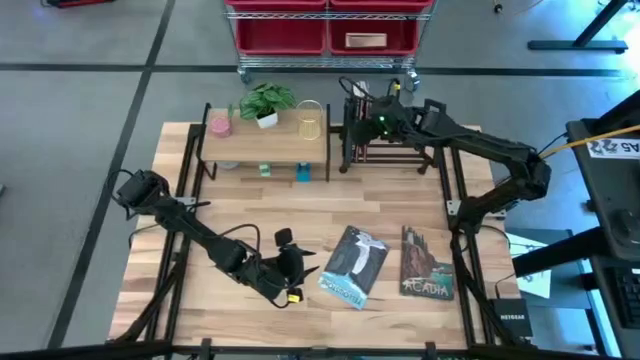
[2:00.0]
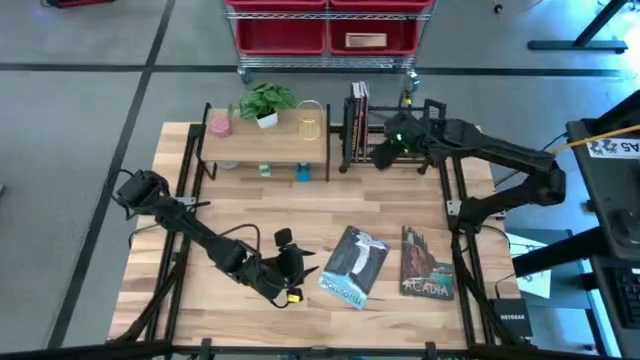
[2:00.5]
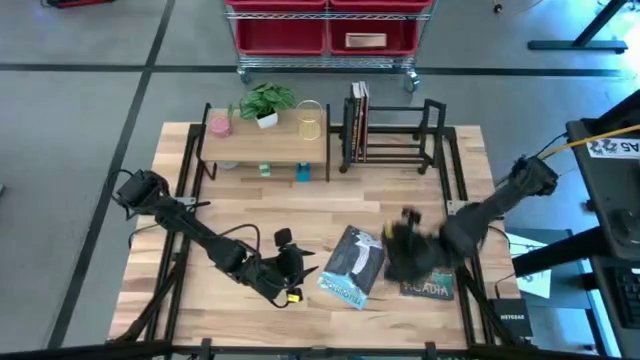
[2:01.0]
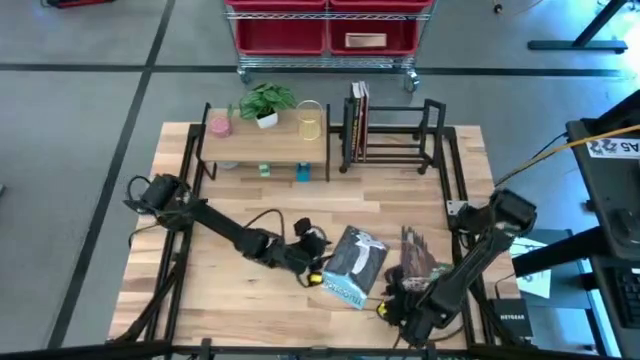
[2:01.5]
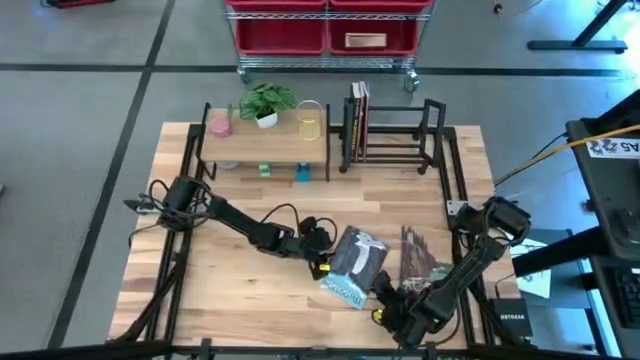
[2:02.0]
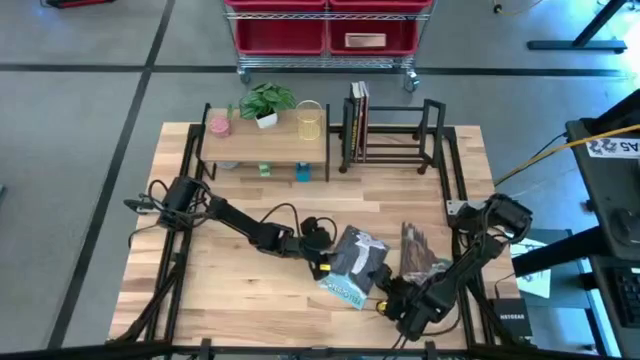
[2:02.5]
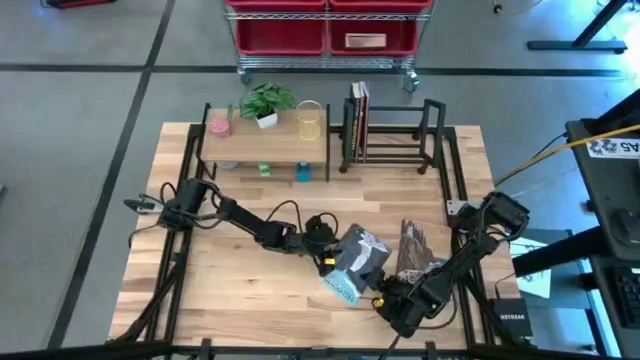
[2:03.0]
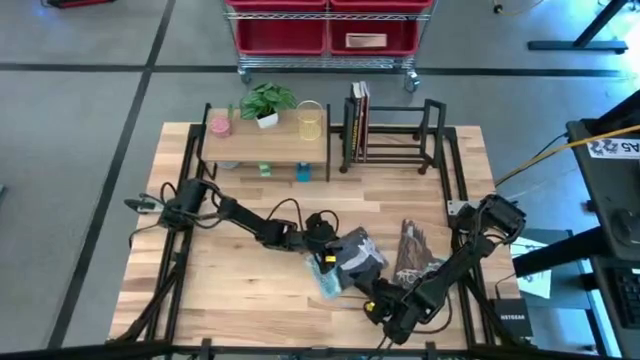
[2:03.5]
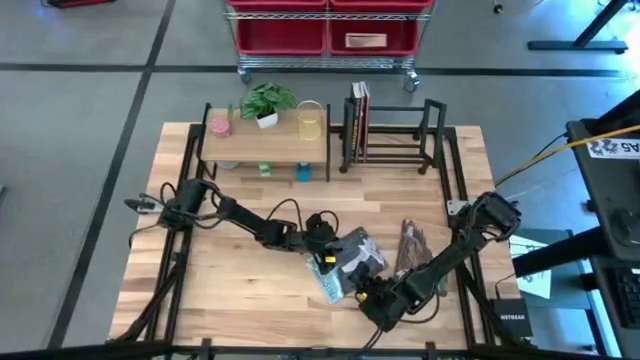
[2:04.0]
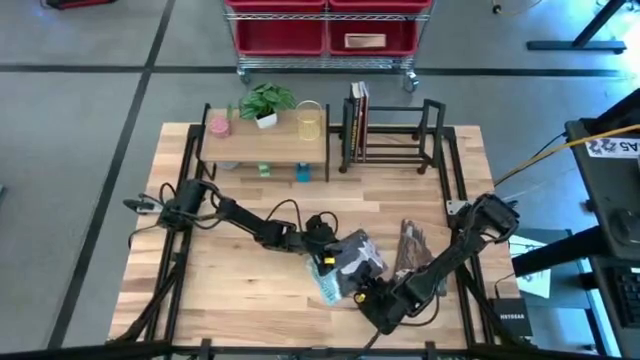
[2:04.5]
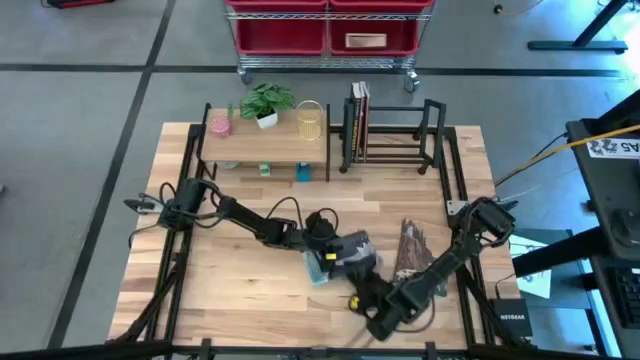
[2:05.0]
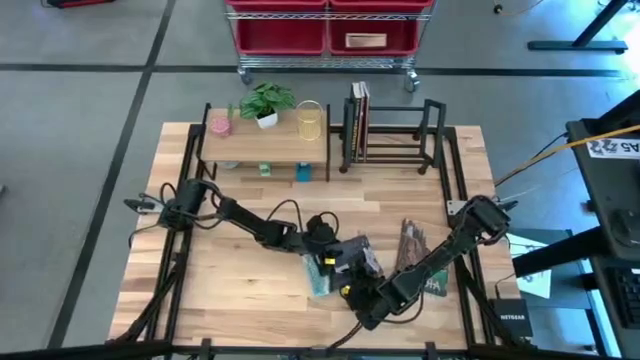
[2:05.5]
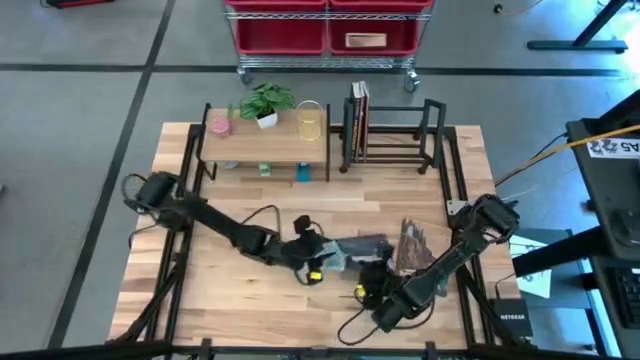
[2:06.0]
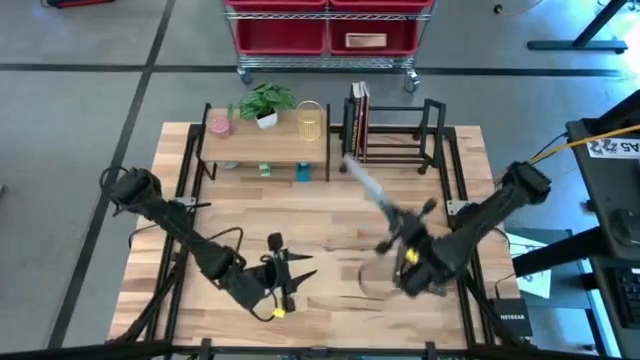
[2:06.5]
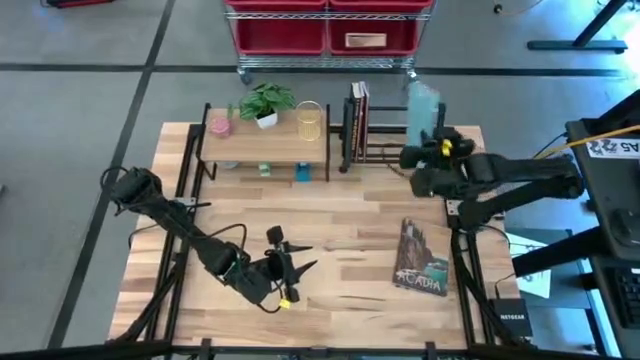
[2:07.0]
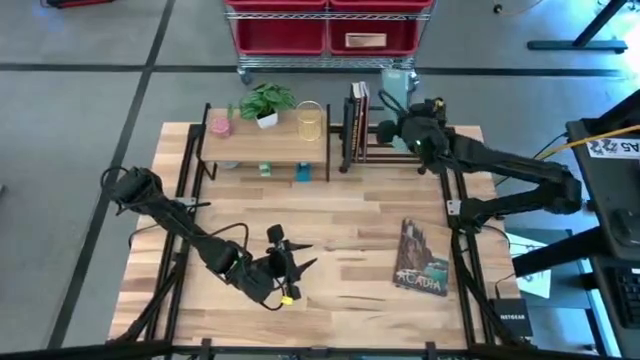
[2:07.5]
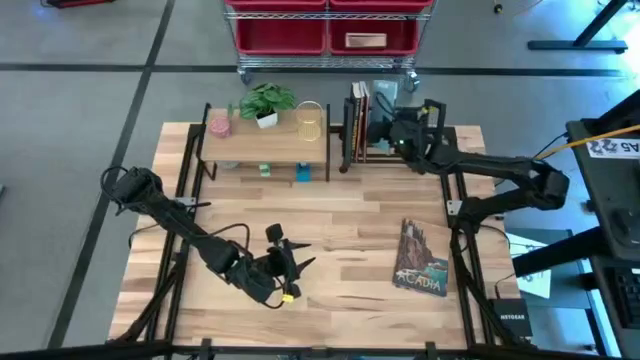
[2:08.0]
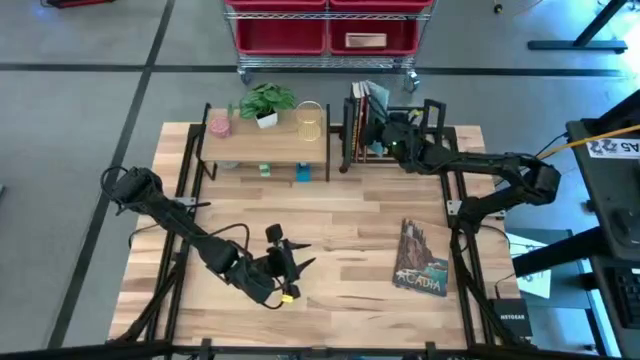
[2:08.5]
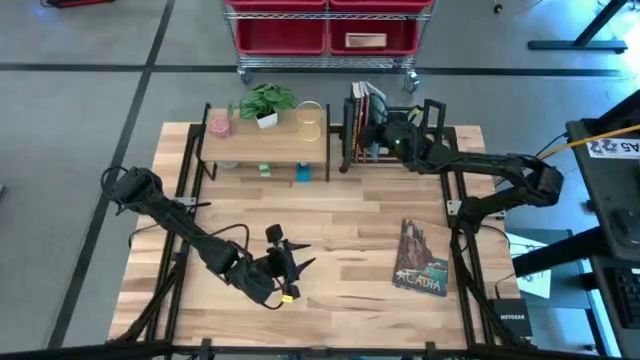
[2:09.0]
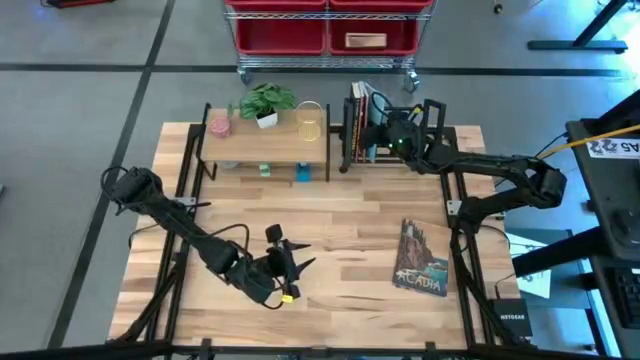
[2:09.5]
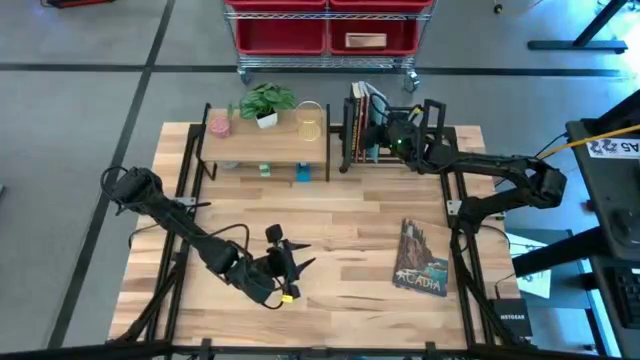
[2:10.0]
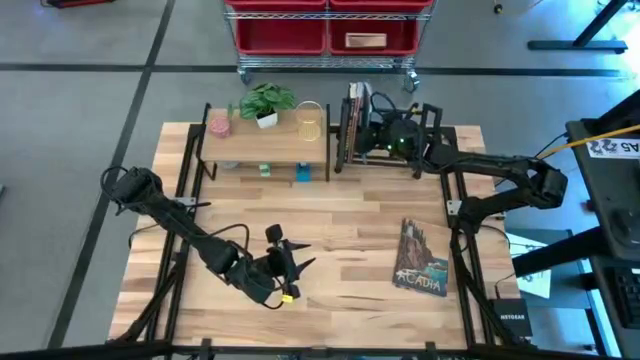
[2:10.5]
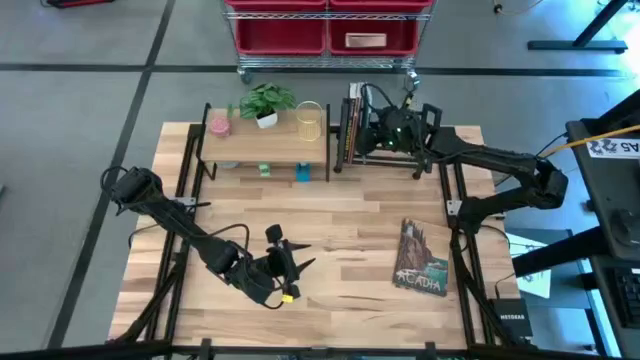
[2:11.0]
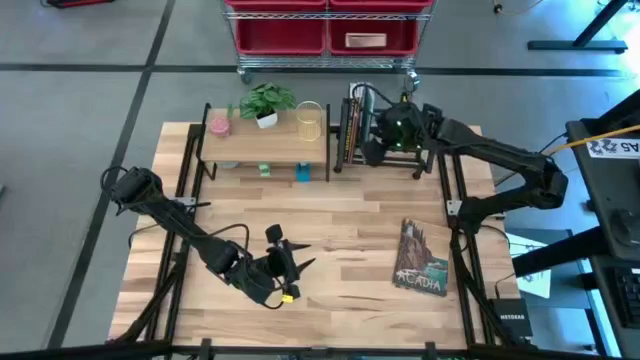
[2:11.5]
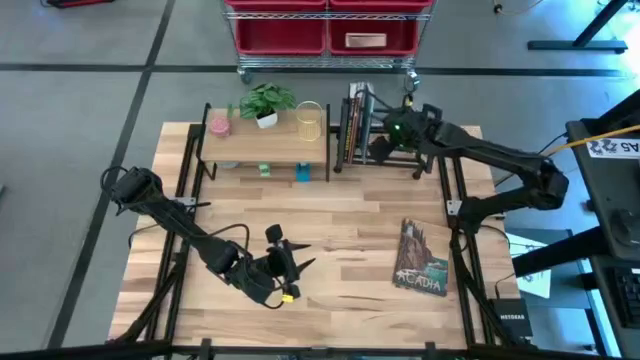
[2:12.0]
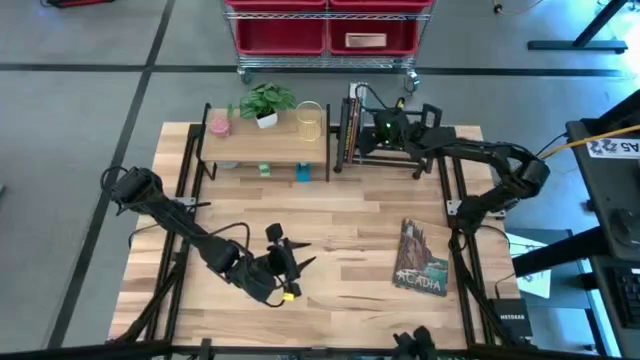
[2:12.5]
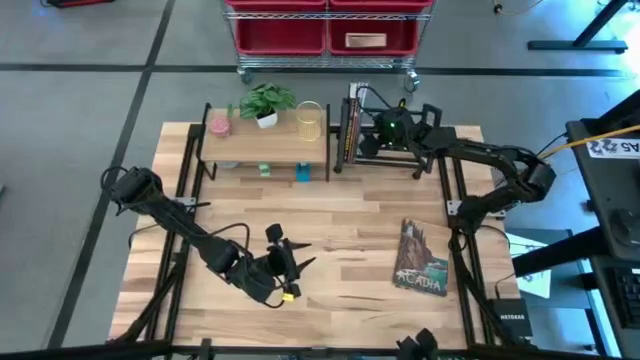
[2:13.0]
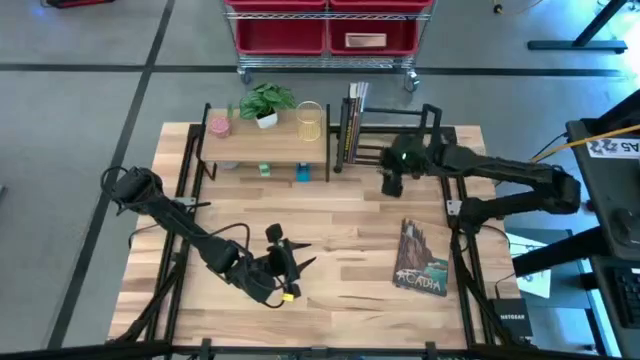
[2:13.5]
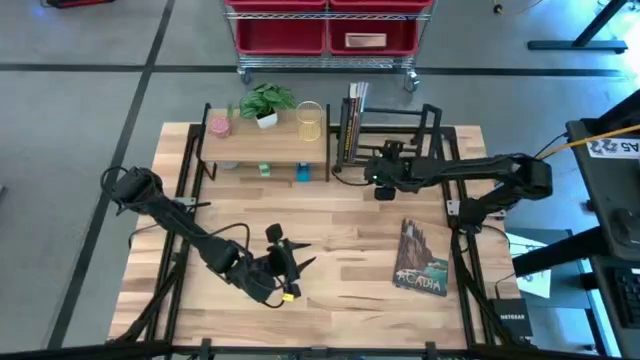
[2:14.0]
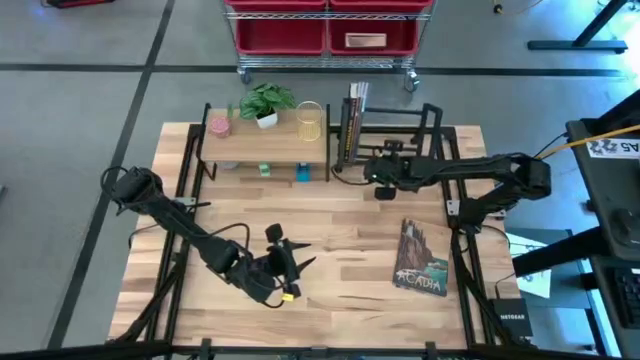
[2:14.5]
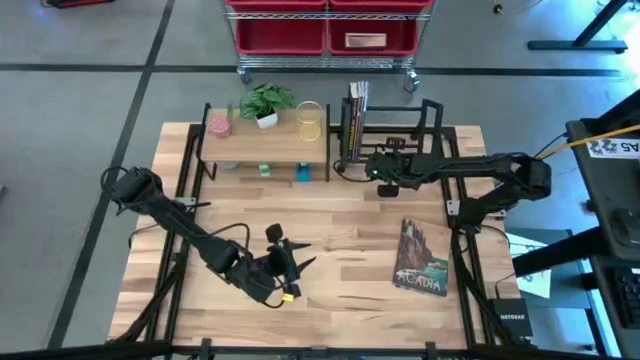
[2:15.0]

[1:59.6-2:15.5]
Task: Stock shelves
Put the light blue book on the bookshelf

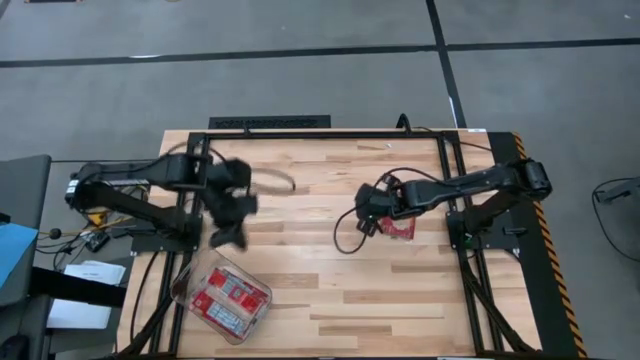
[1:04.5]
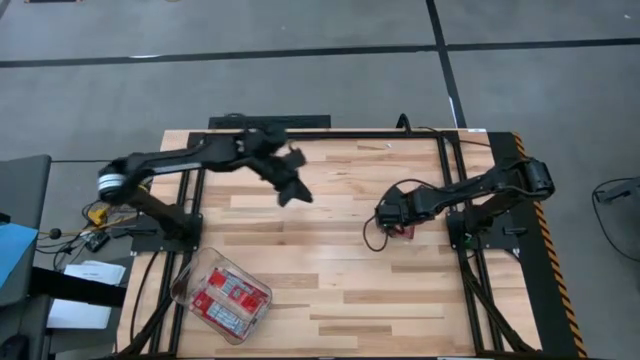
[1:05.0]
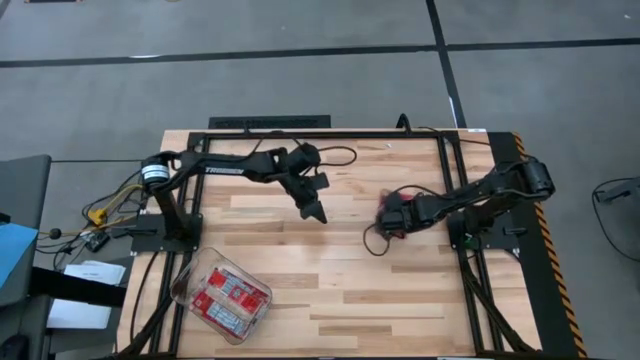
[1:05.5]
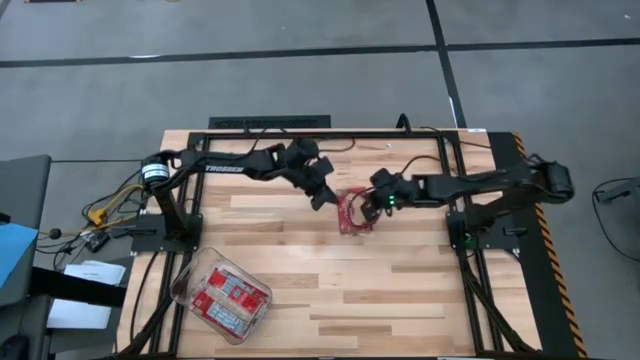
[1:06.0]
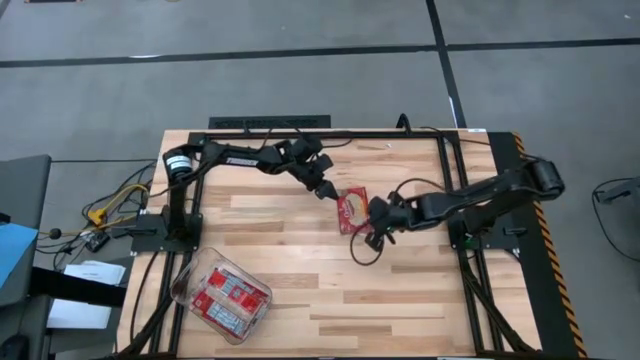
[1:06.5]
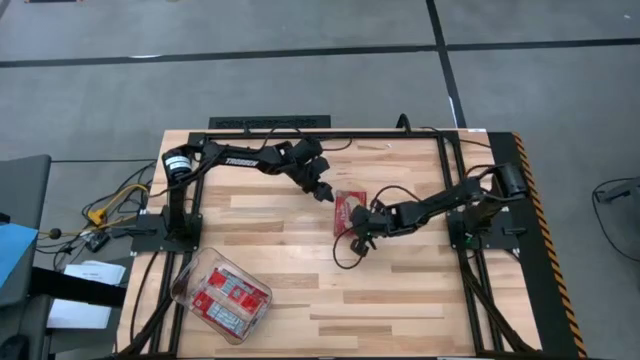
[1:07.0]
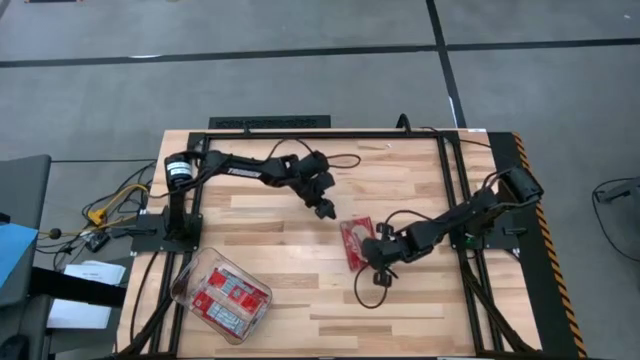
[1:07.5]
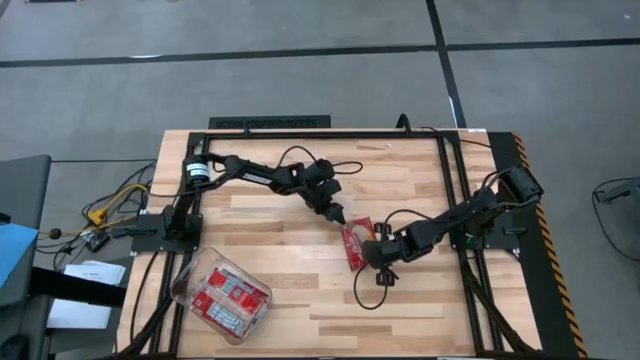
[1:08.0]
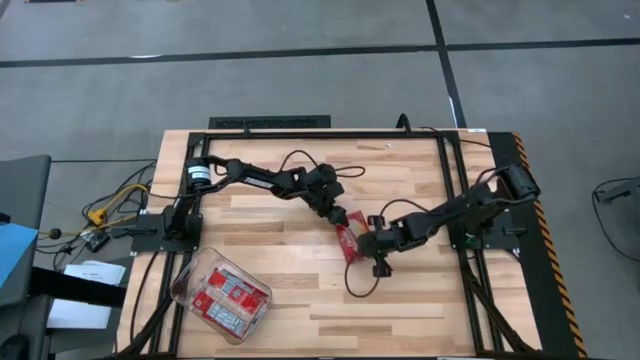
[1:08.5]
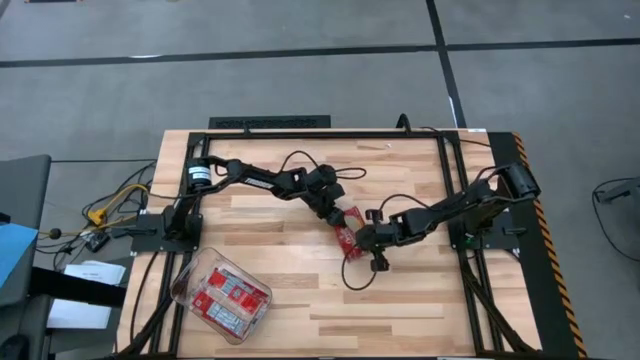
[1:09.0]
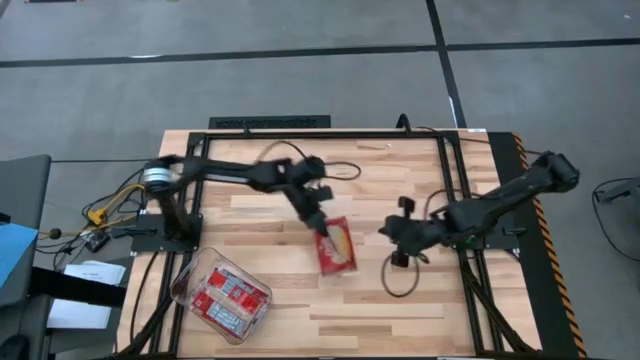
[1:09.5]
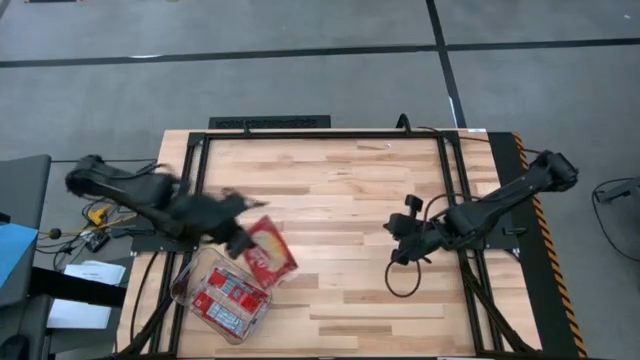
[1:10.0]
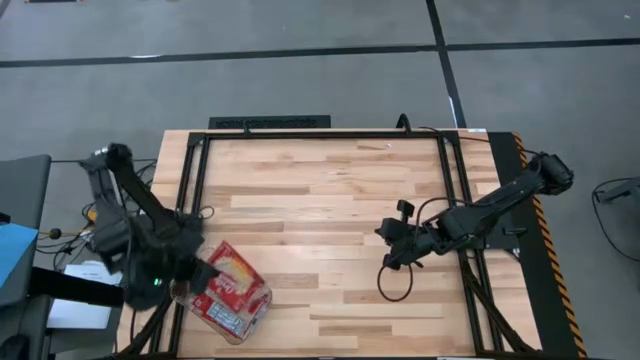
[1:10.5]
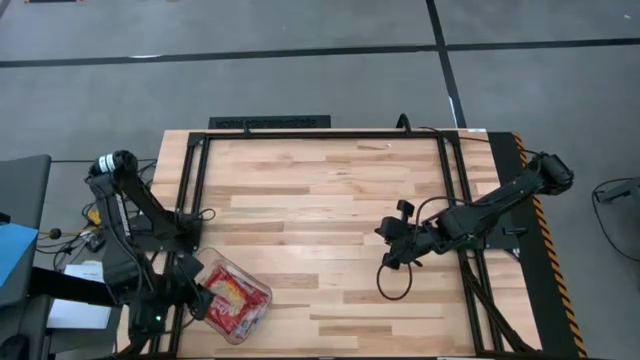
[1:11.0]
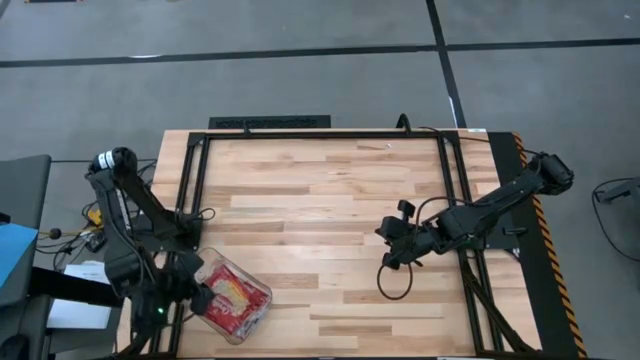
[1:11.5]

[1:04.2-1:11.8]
Task: Sort popcorn bags into baskets
Put the red popcorn bag into the transparent bin
